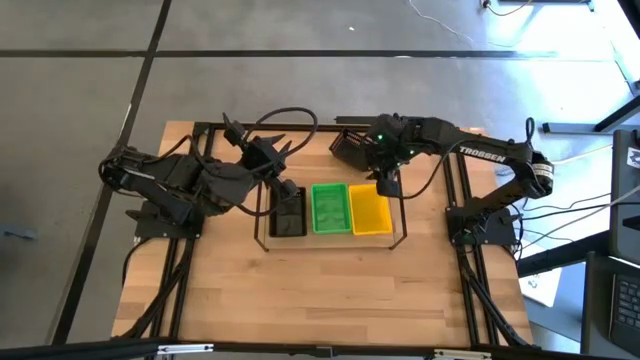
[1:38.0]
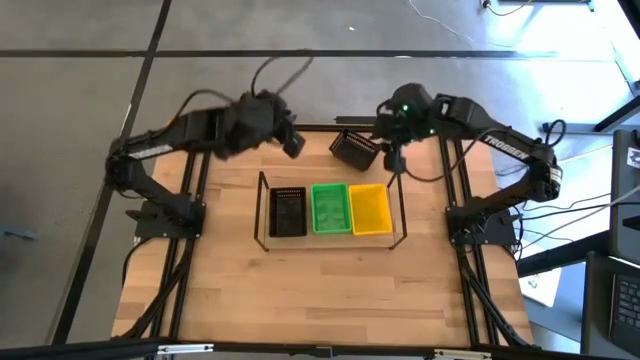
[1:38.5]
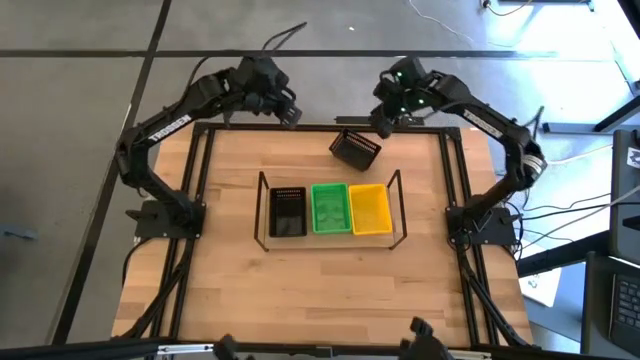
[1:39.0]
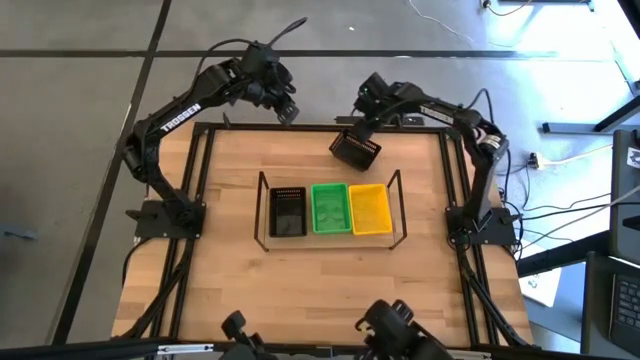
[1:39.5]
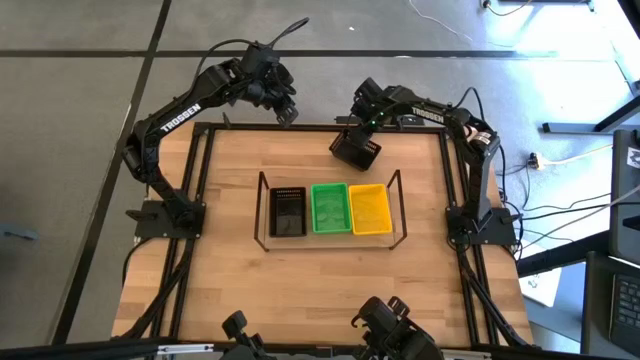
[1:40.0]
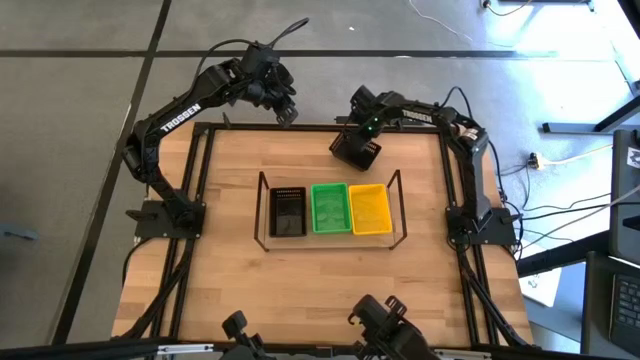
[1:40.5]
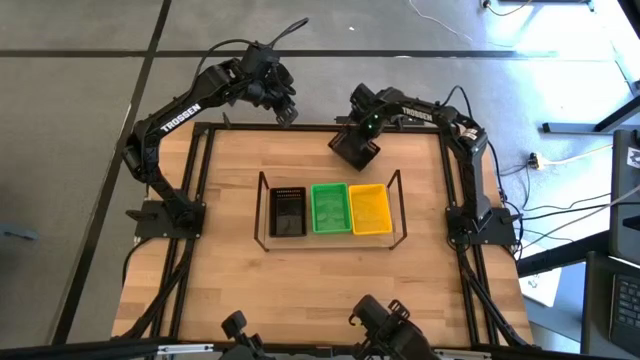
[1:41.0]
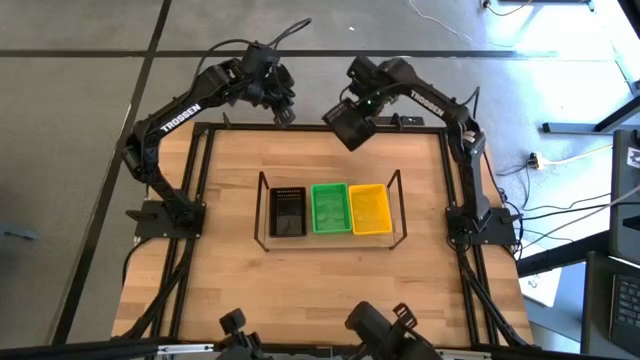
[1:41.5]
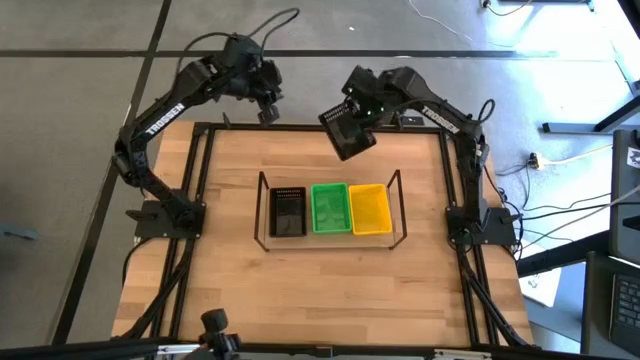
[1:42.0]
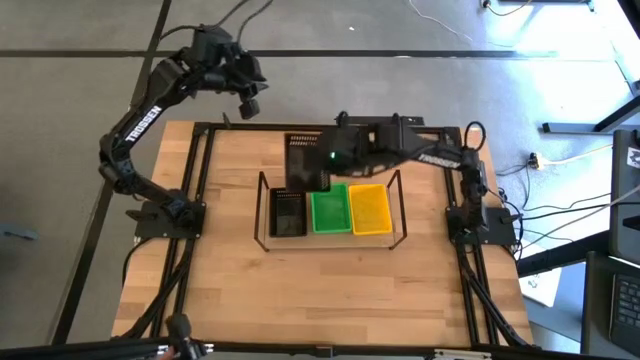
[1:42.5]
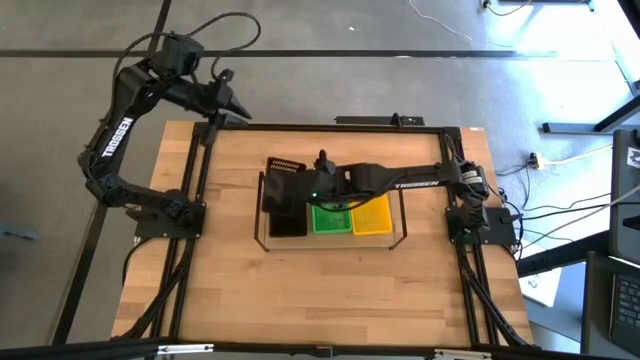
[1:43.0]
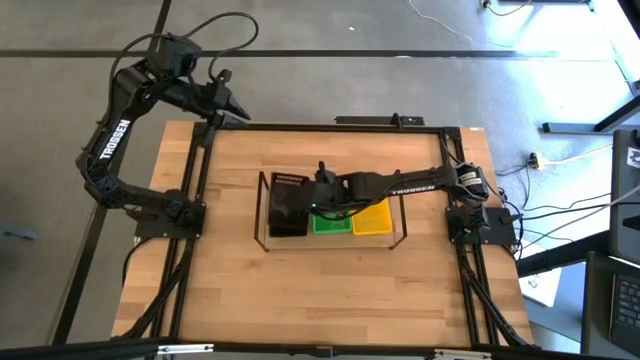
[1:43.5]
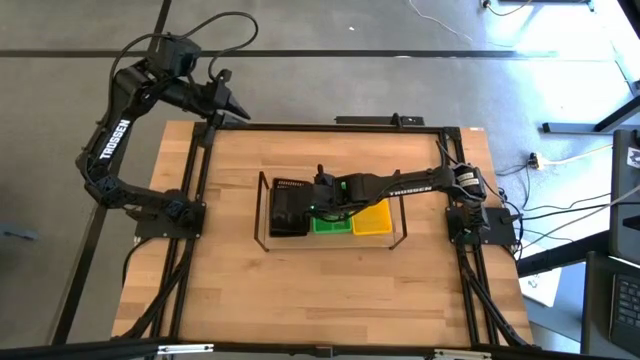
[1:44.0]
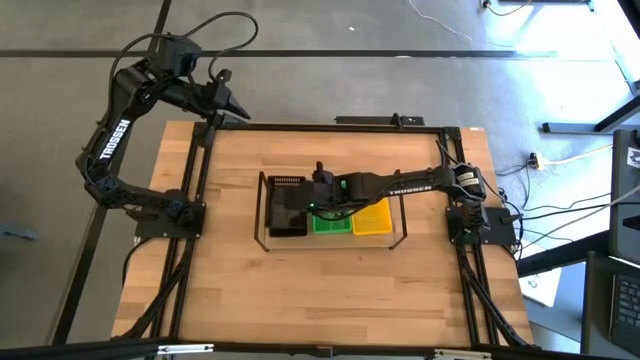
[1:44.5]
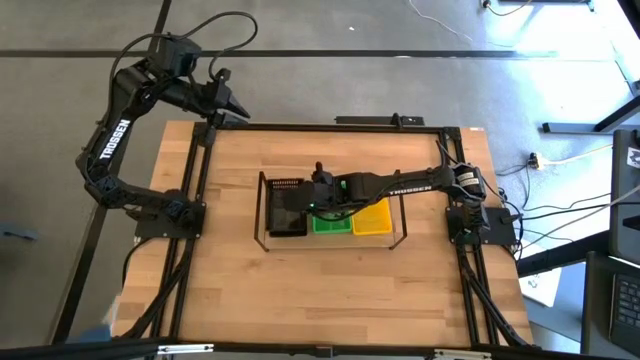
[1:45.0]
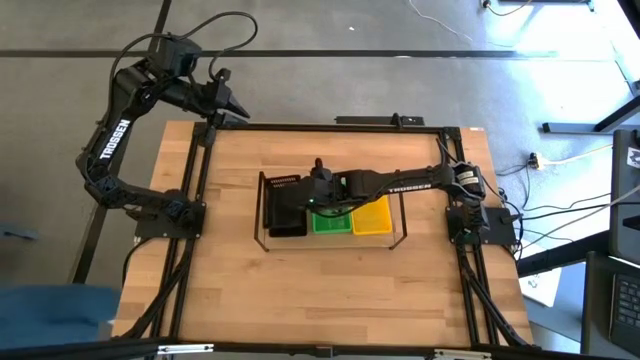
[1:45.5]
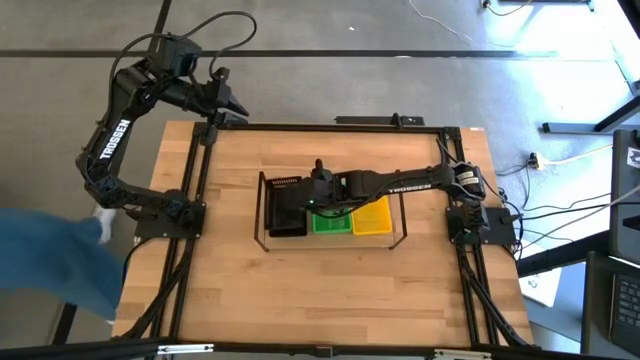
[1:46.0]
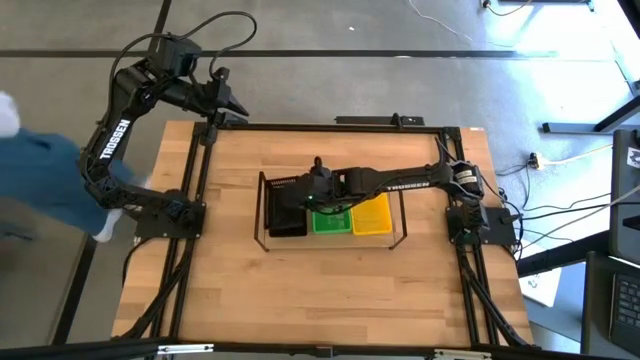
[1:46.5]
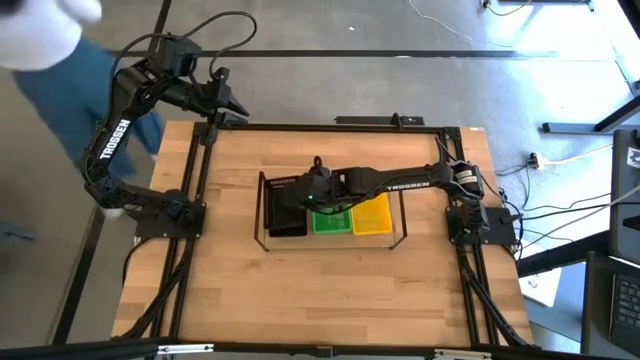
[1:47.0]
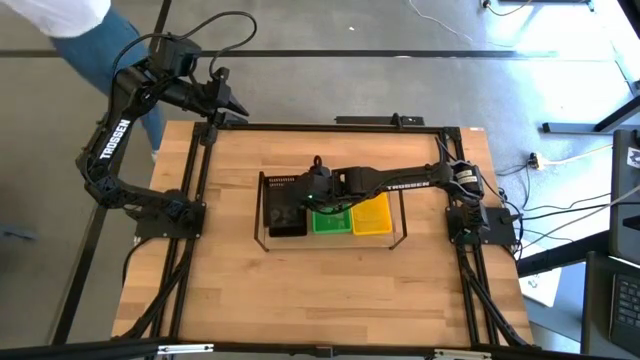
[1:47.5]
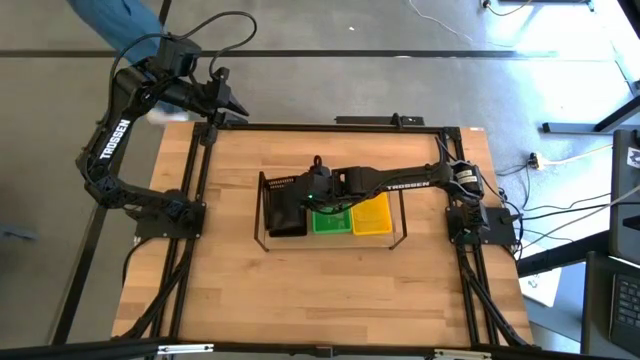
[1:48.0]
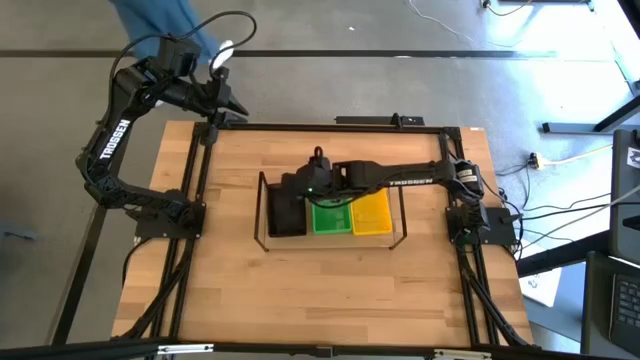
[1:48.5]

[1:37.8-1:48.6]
Task: Stack baskets on shelf by color
Stack the black bin on top of black bin on the shelf

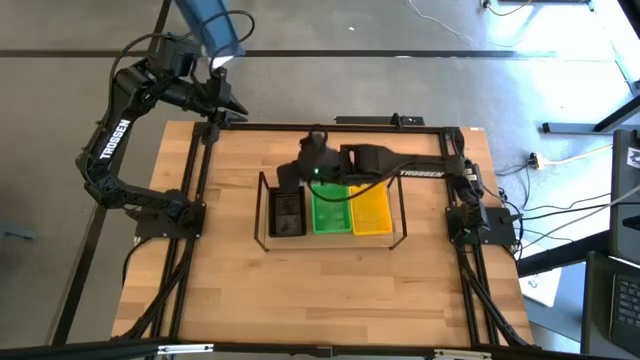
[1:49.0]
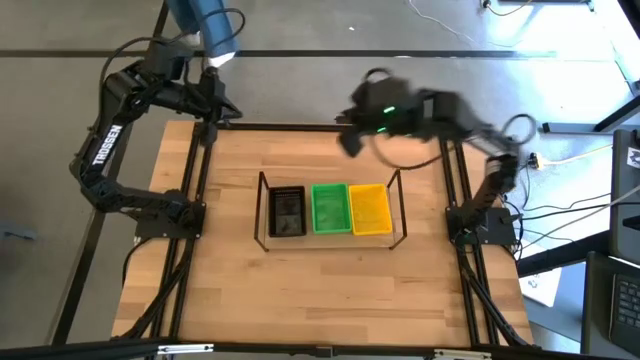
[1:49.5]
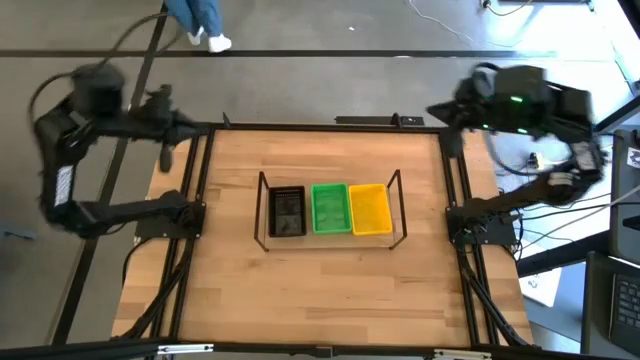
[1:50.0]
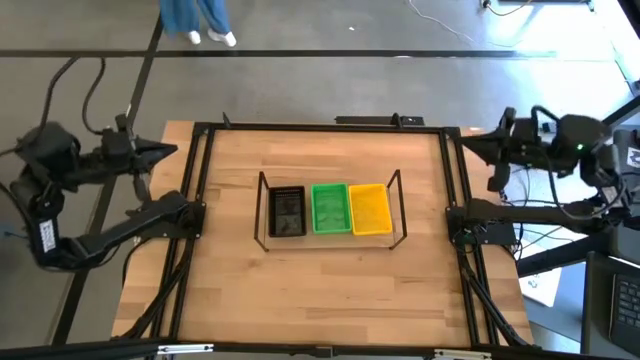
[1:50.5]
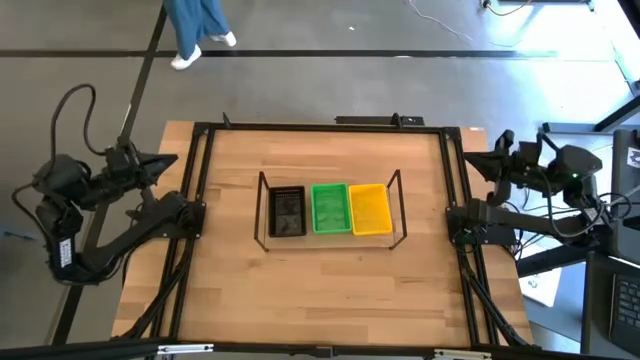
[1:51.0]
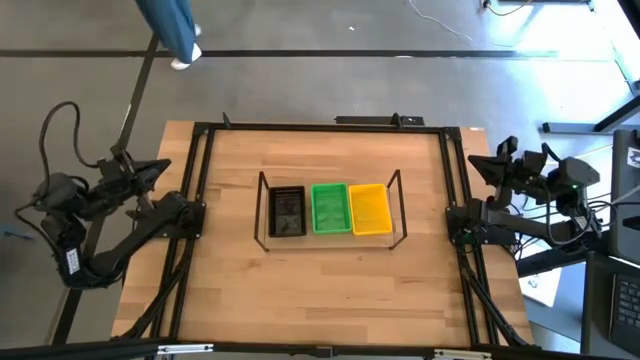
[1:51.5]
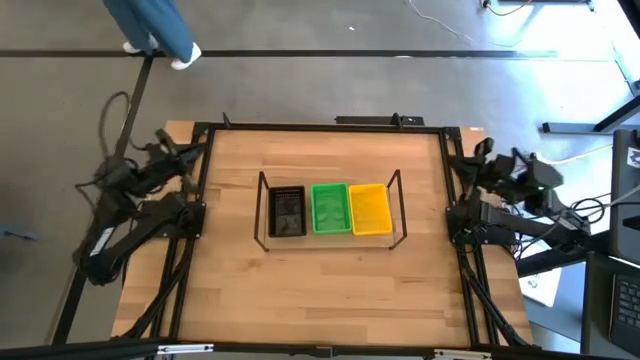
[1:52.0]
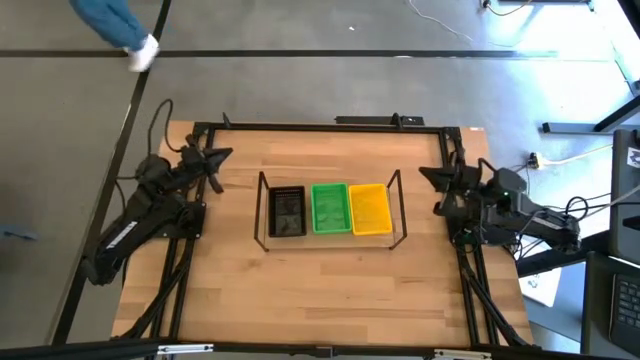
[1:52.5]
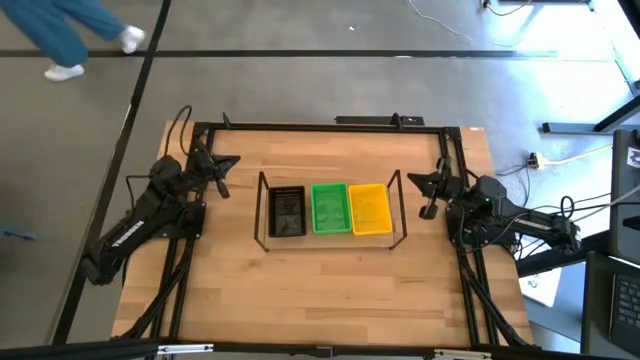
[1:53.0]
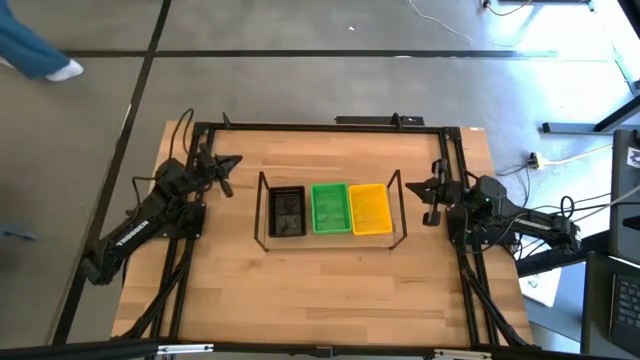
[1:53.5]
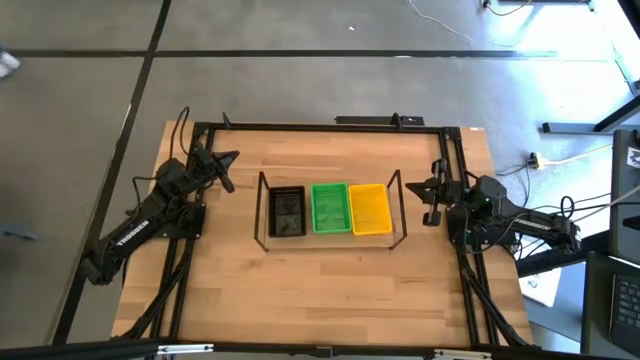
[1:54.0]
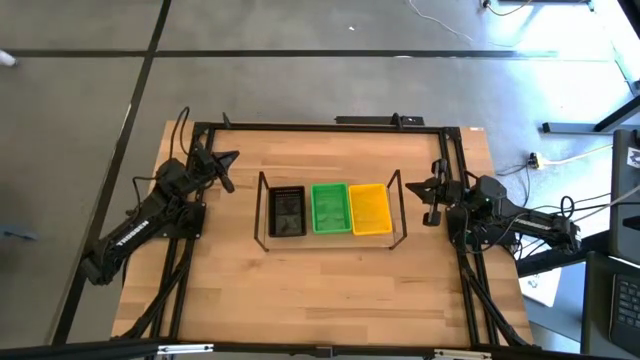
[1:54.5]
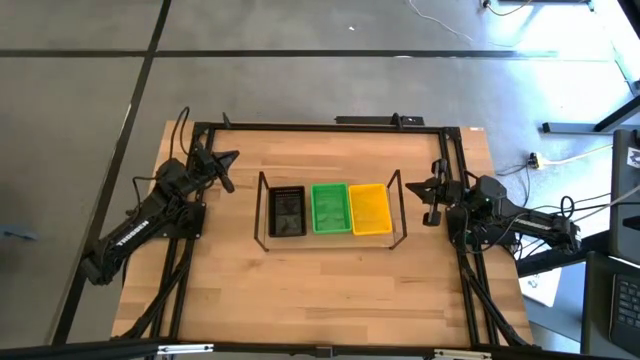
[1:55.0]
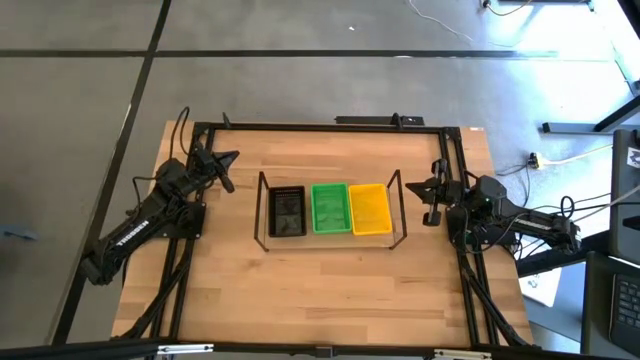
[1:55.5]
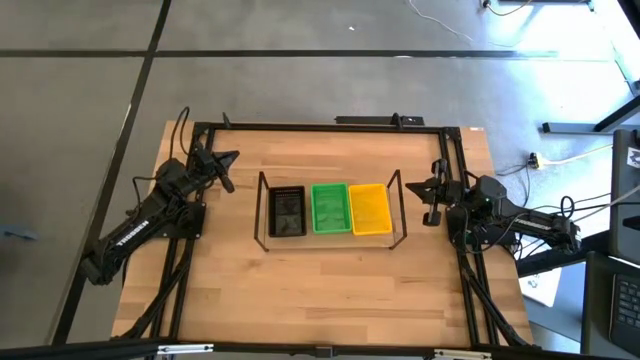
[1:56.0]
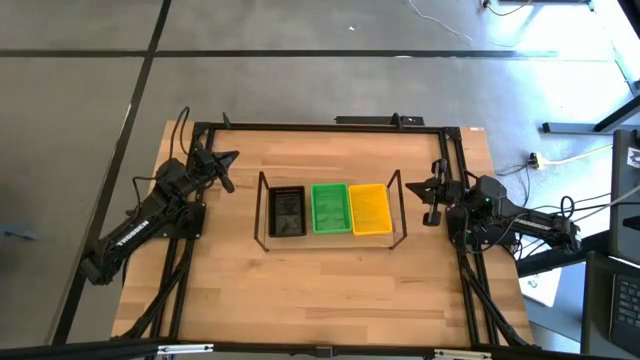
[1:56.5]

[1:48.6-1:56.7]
Return to home position

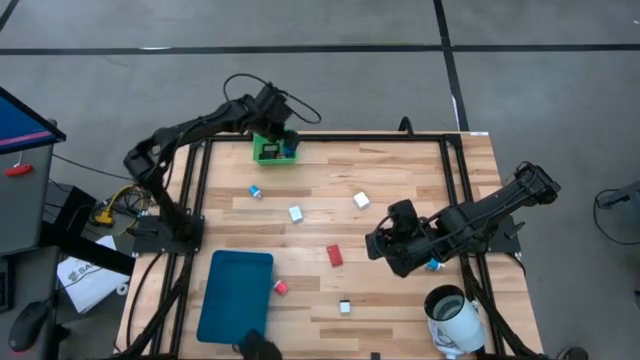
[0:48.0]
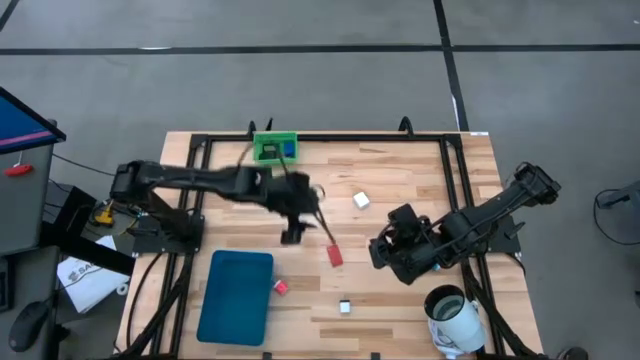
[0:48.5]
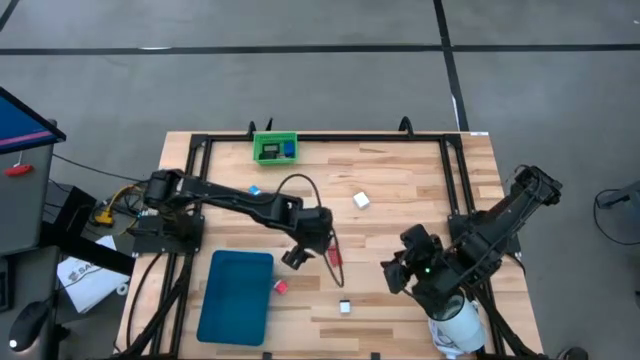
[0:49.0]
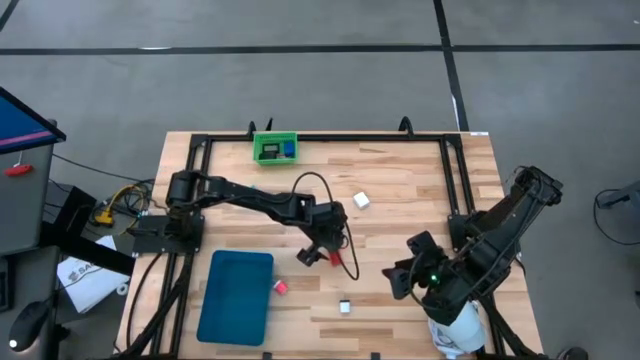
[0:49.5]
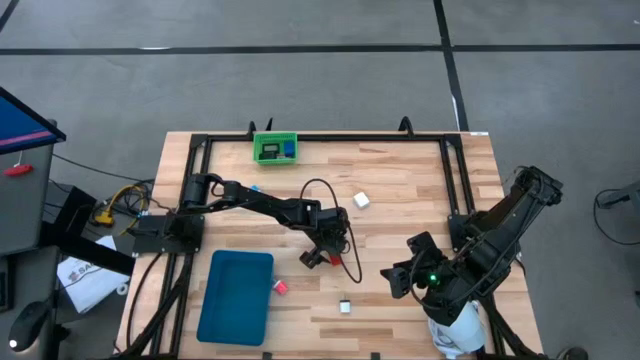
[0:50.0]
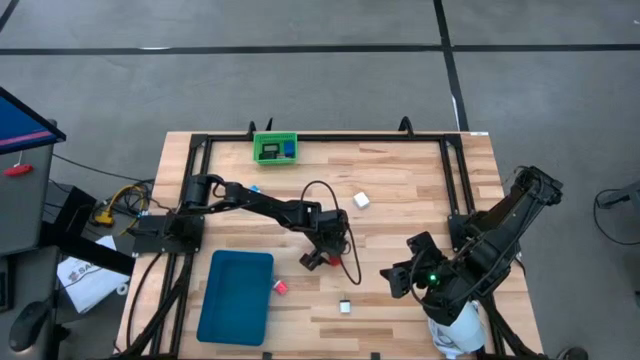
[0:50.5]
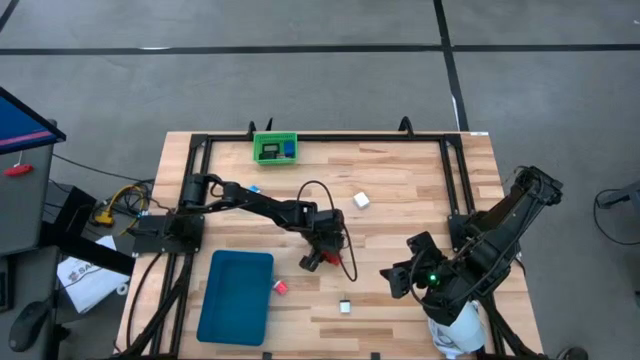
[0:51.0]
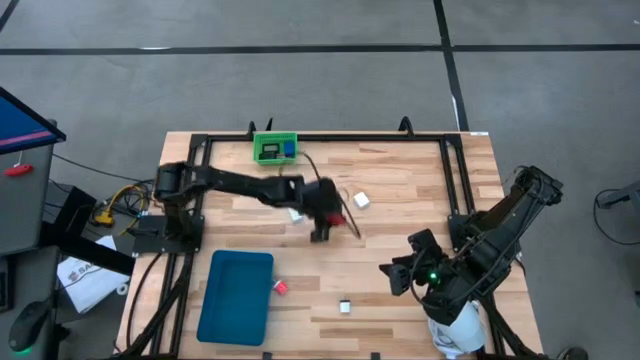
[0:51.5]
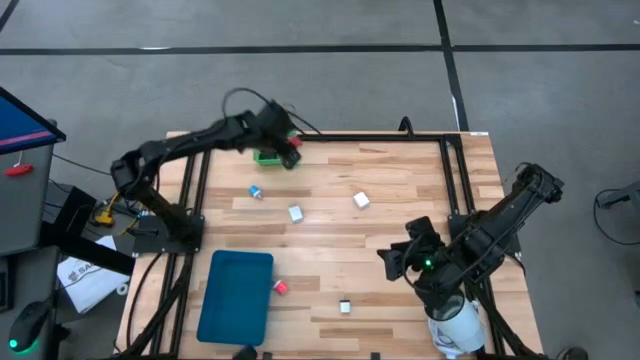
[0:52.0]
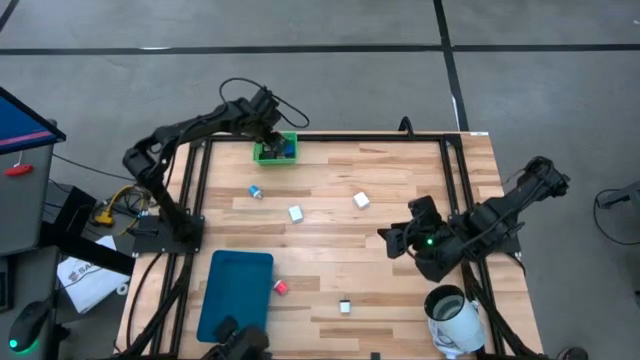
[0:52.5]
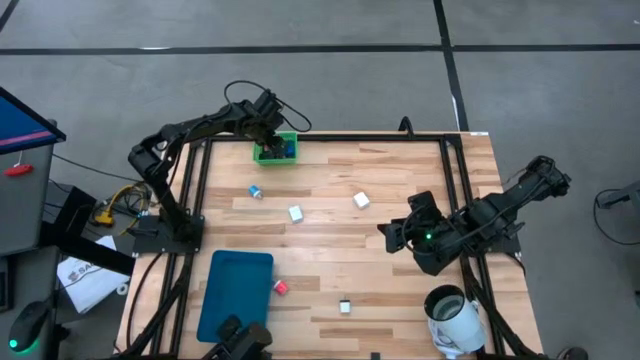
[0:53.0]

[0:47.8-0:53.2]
Task: Pick & Place Office items
Put the red digital clock into the green bin
